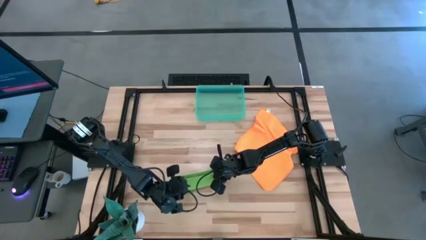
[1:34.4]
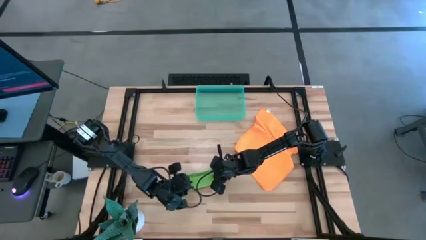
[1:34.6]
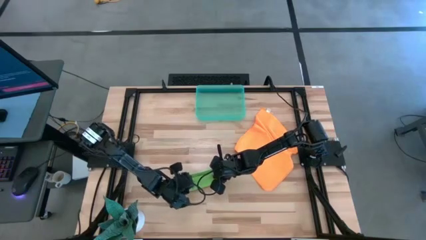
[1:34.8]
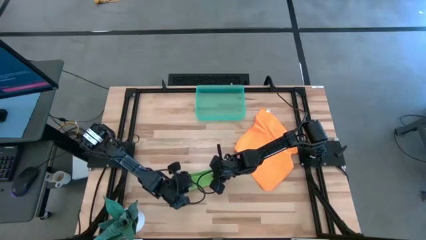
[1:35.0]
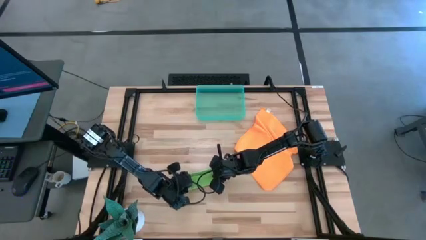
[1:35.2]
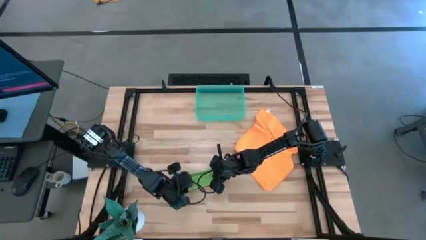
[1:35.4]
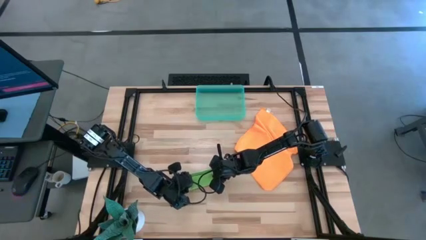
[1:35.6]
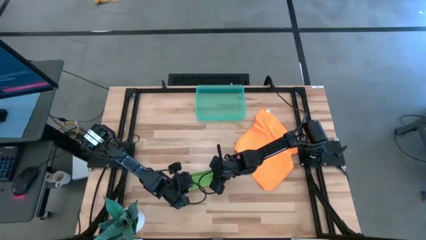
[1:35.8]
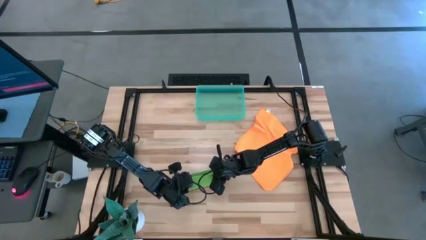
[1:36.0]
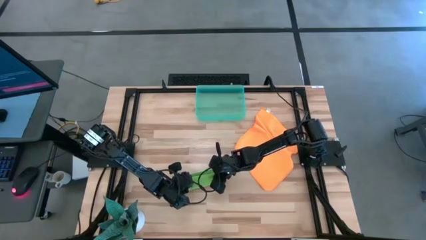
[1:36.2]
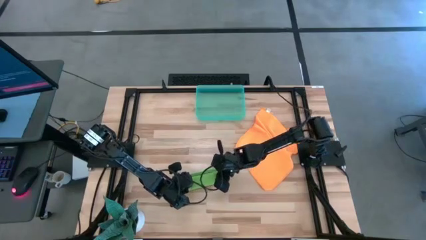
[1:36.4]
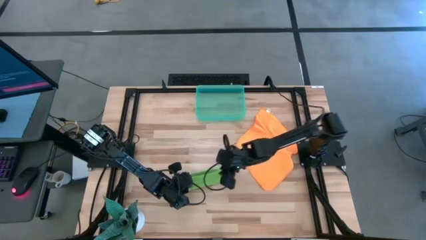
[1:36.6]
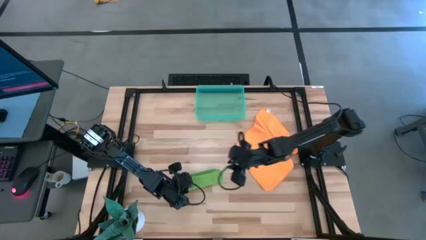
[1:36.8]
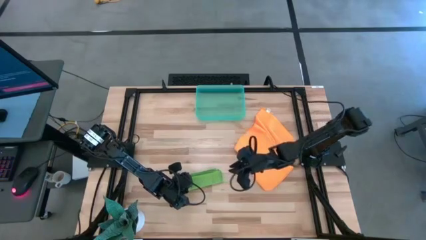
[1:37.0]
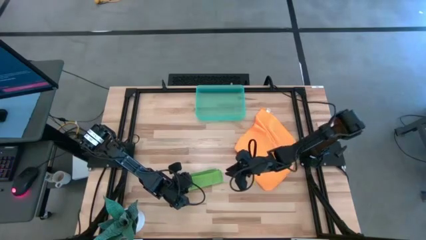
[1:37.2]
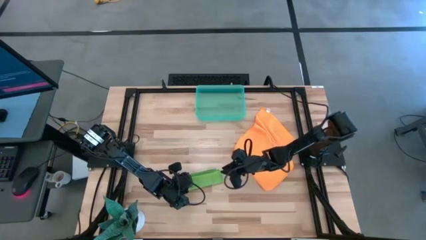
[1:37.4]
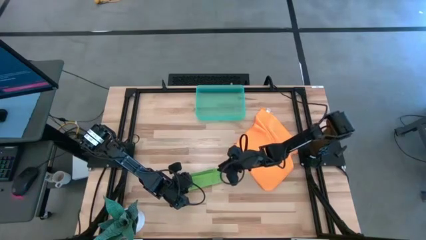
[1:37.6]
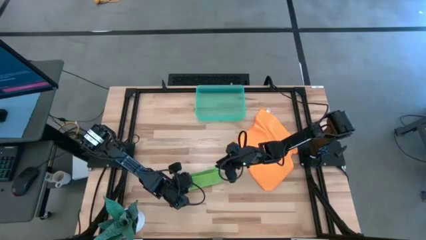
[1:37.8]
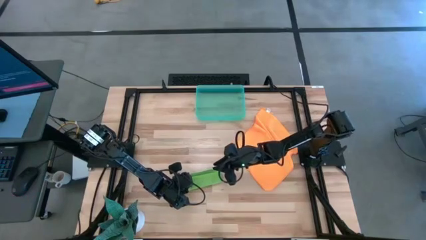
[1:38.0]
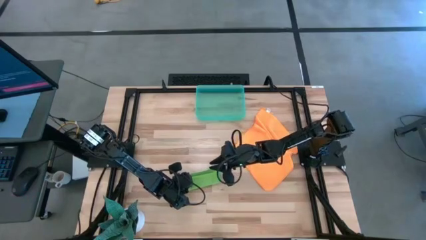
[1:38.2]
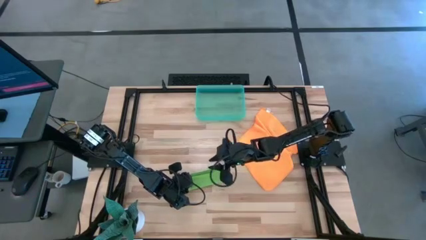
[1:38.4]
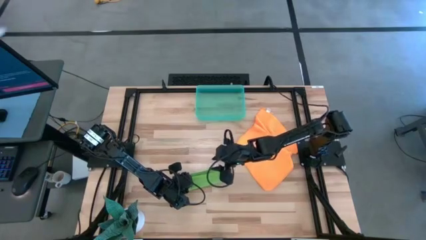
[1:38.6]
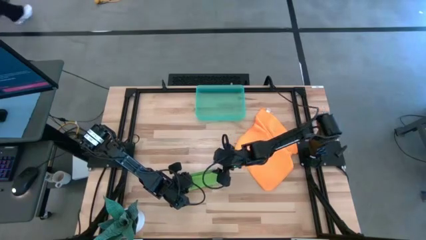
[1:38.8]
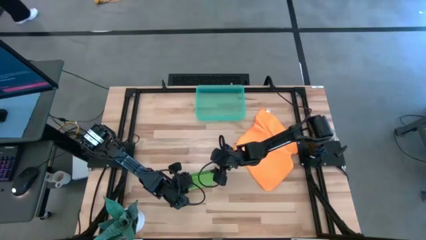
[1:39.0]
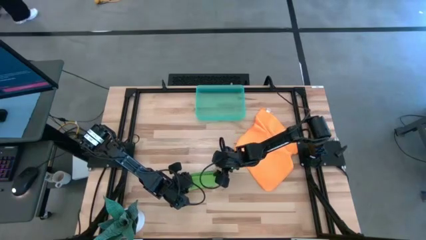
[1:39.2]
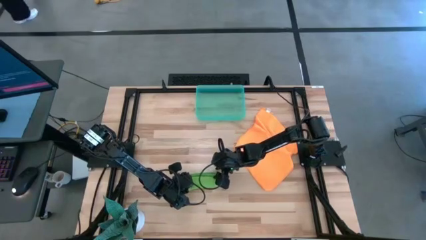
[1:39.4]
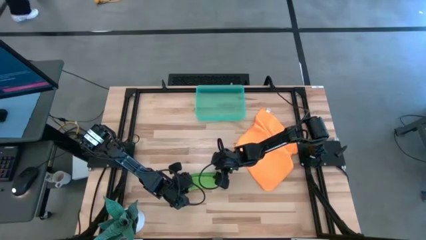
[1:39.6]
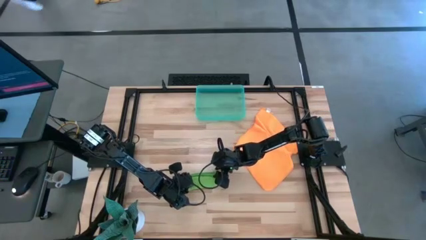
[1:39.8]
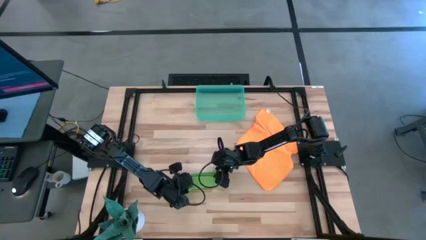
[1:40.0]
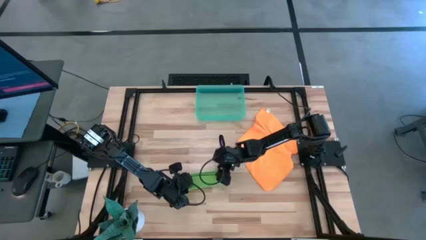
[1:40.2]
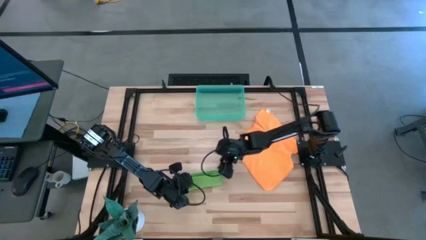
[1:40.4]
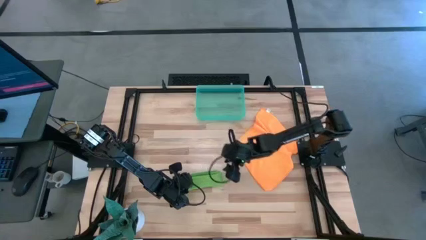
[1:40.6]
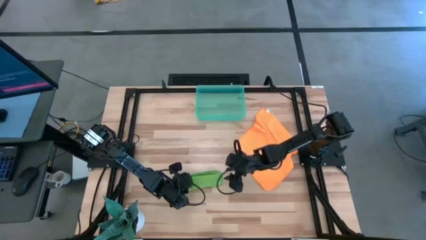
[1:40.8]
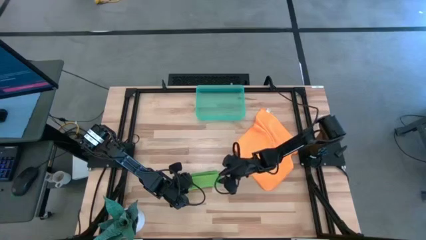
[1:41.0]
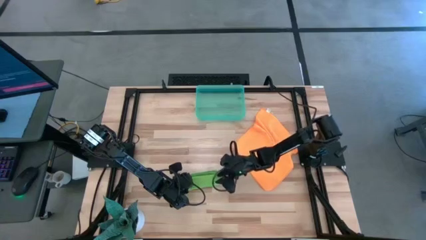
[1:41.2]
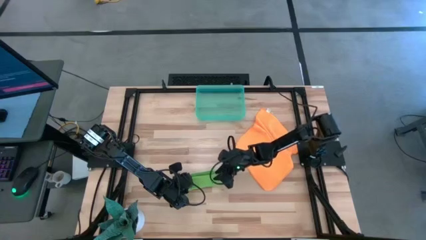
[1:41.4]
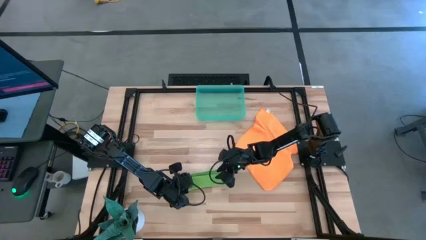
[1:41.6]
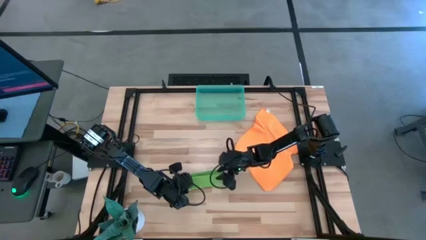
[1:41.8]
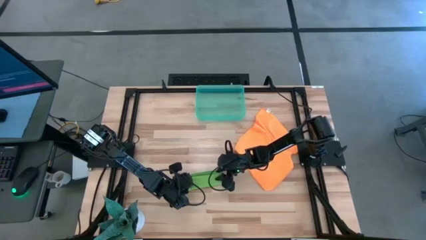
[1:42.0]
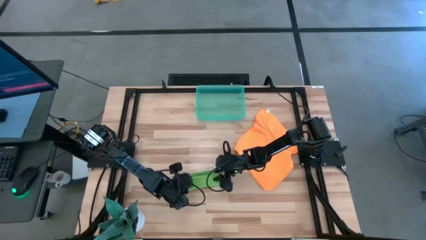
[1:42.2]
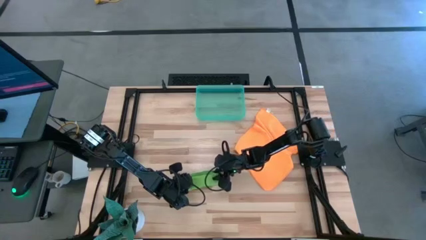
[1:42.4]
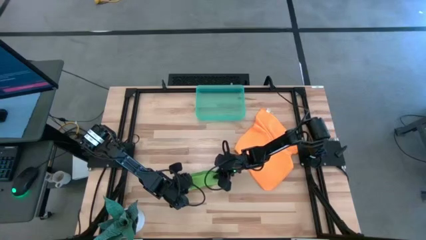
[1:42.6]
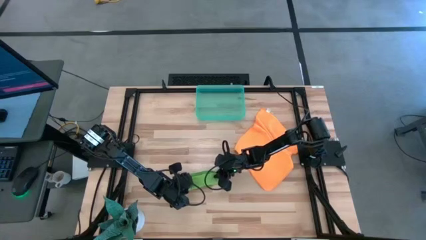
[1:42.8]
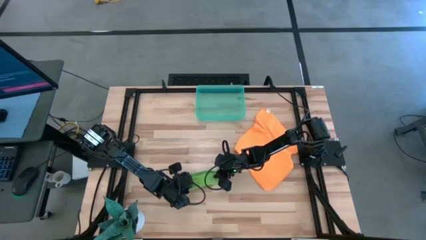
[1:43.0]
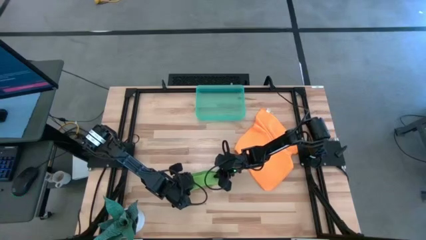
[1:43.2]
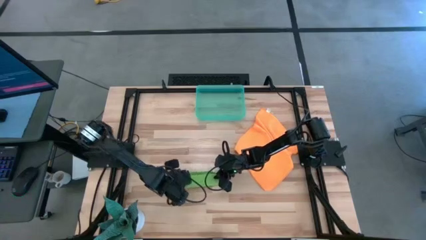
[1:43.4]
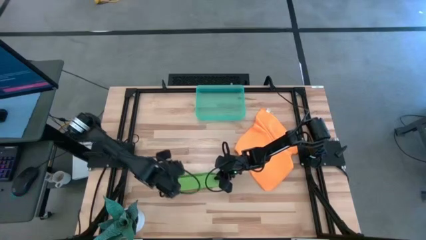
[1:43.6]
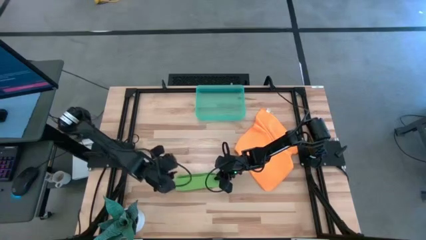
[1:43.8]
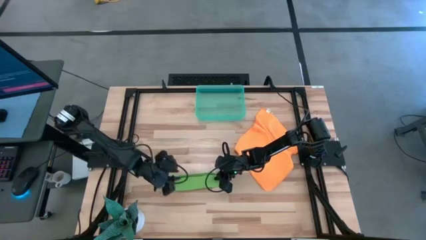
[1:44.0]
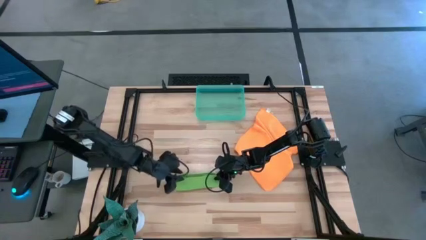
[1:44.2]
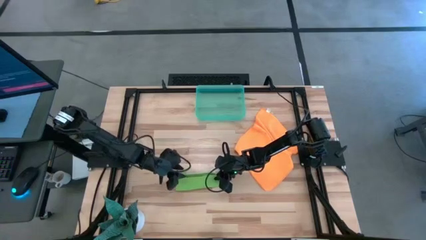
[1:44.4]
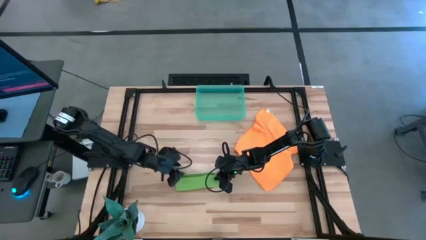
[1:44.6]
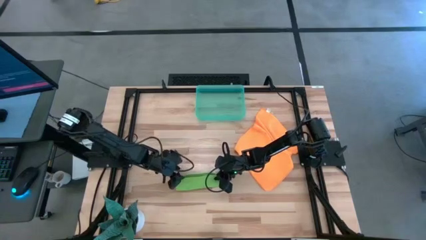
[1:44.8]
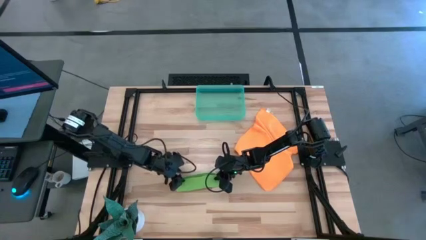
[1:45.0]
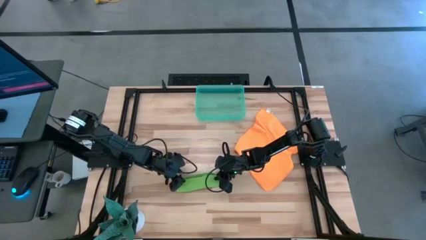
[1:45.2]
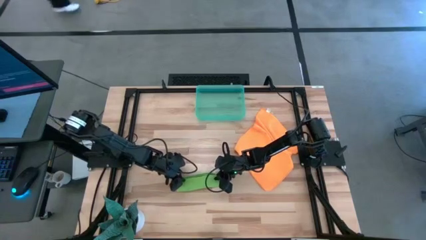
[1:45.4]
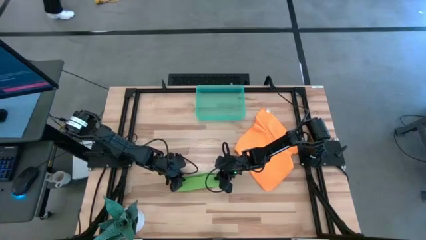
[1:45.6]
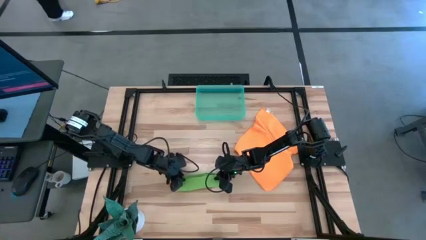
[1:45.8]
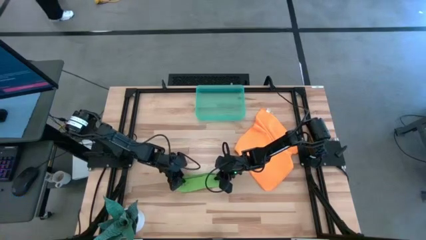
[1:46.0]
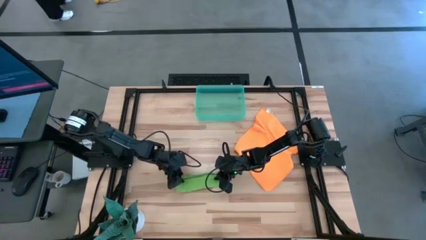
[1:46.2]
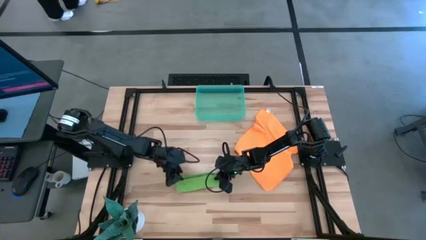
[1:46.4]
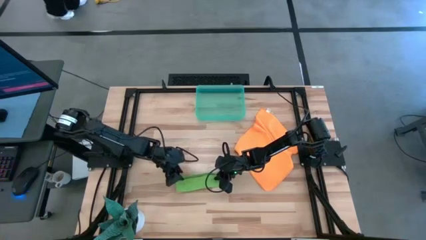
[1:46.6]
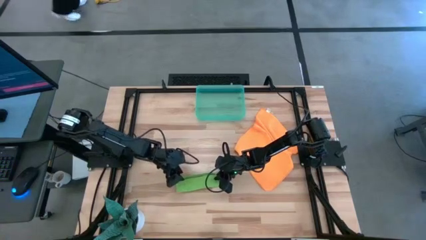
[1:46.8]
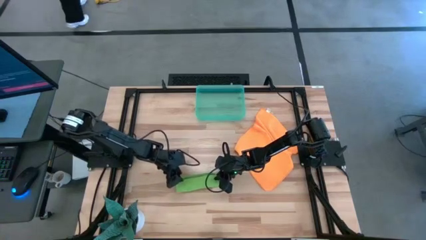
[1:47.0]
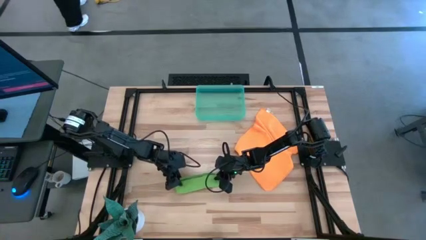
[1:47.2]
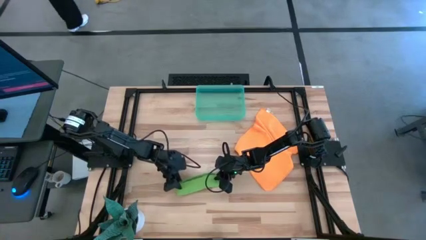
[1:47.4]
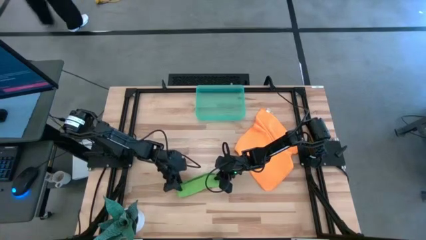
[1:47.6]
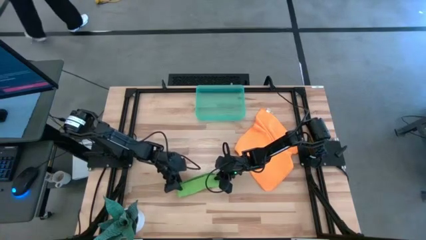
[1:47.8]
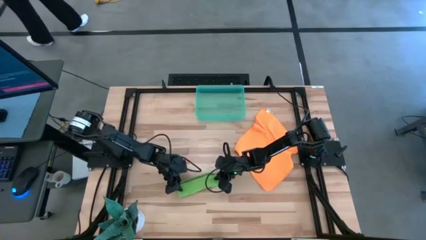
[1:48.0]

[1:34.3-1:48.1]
Task: Roll microfiber towels into tight, uniform cylinder then place into a basket
Roll the green microfiber towel

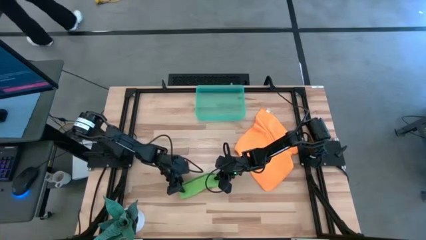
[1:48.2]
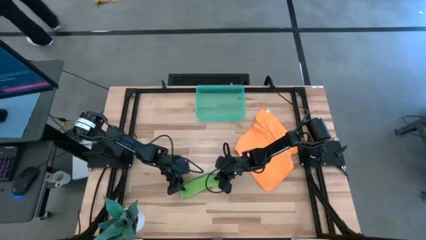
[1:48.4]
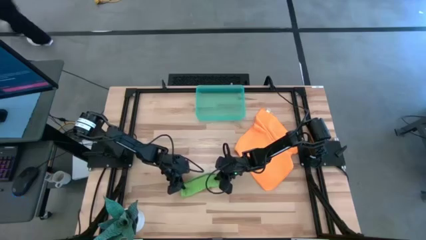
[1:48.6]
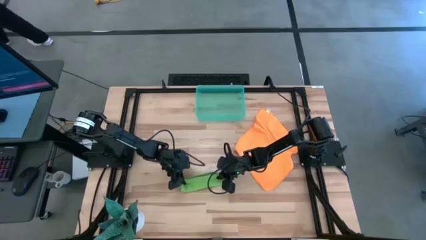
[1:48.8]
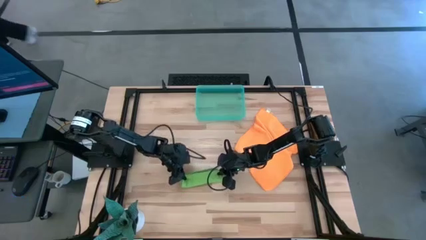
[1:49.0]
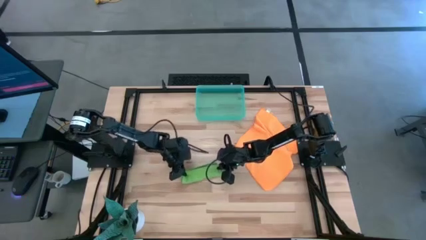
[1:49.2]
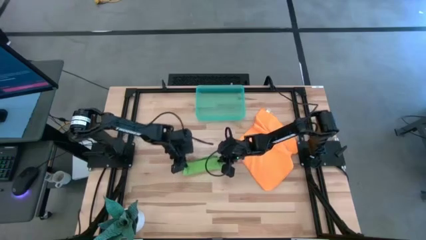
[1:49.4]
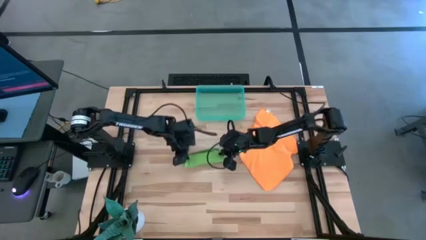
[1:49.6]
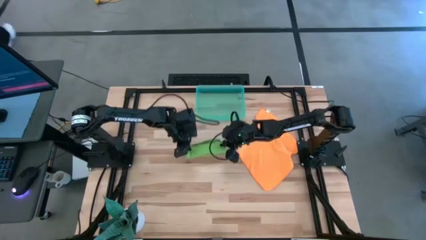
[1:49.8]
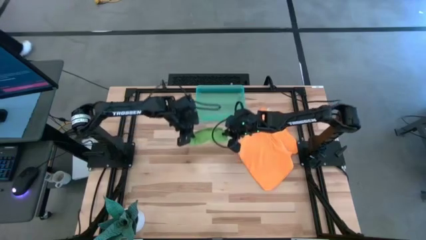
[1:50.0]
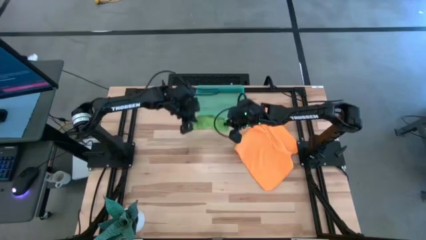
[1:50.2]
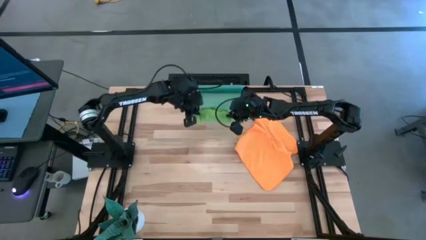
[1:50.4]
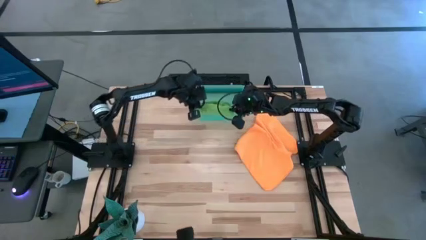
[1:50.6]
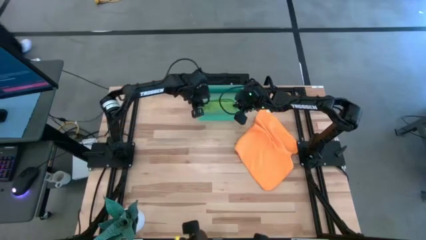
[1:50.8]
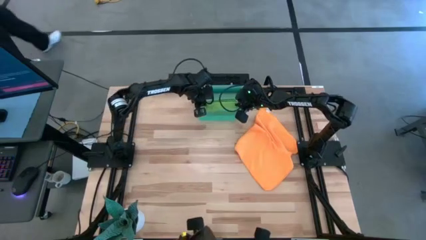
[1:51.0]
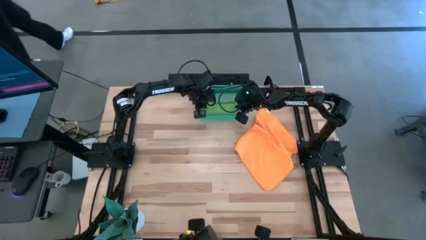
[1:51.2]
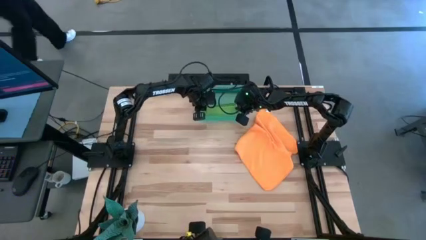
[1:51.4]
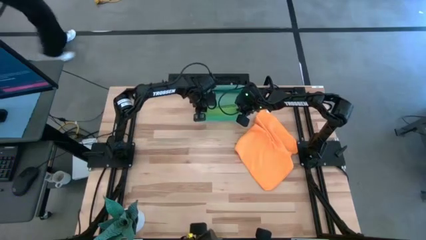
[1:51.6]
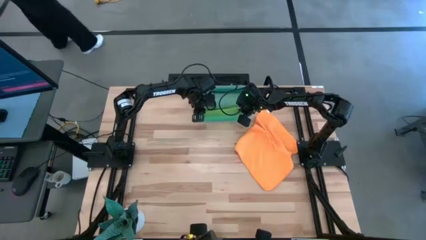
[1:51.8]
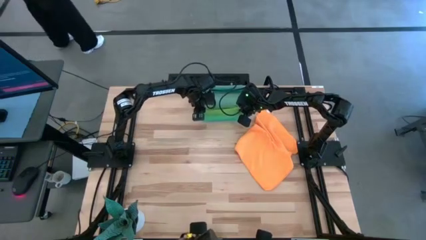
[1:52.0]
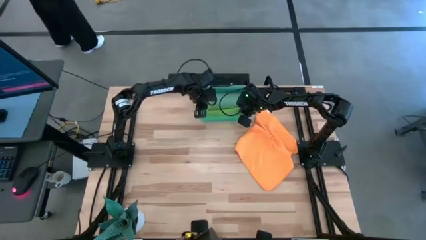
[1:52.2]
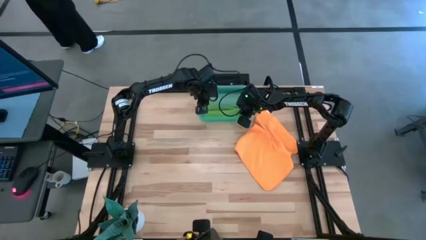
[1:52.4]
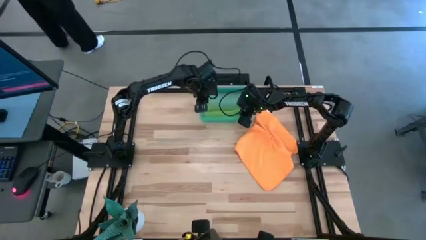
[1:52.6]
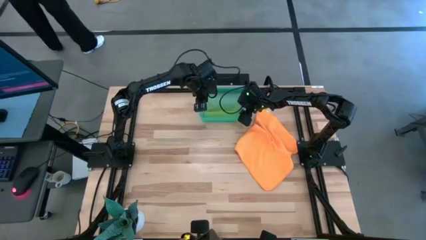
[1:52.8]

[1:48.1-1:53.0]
Put the green microfiber towel into the blue bin
